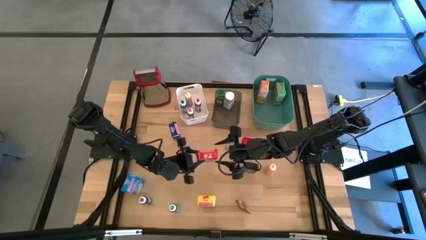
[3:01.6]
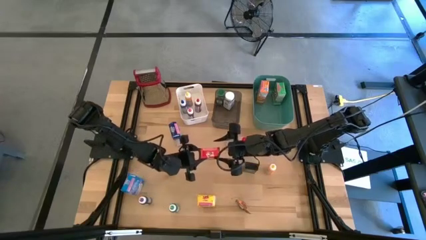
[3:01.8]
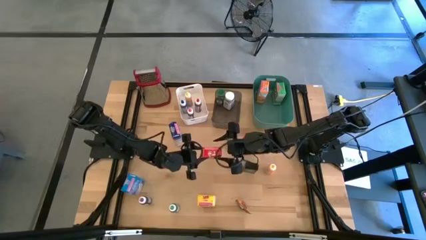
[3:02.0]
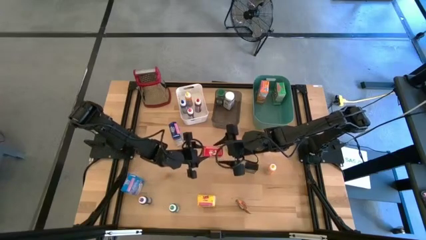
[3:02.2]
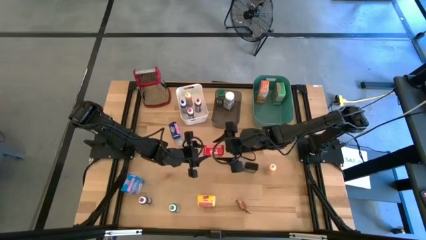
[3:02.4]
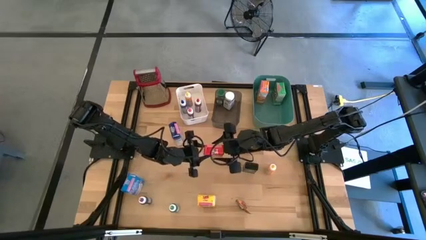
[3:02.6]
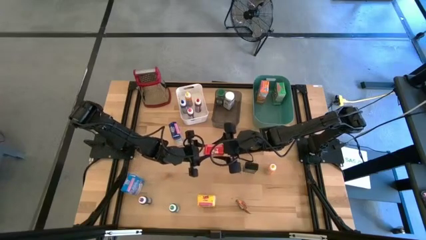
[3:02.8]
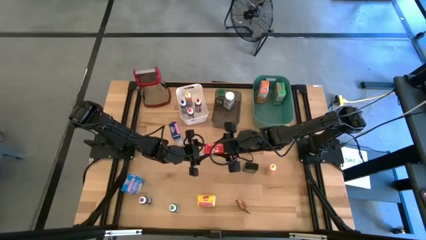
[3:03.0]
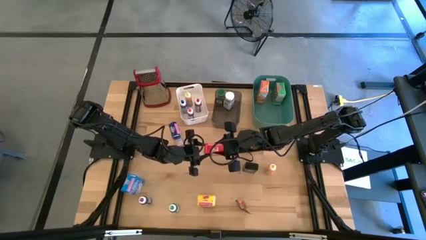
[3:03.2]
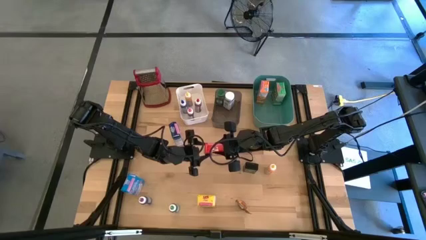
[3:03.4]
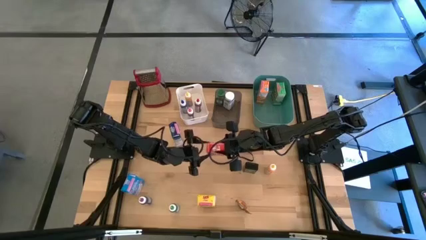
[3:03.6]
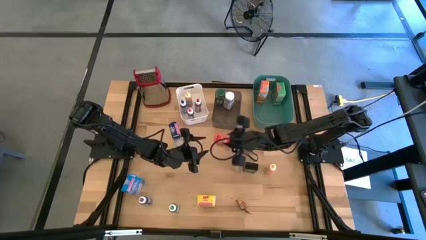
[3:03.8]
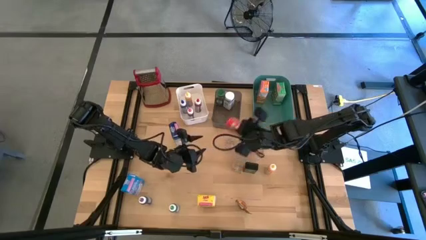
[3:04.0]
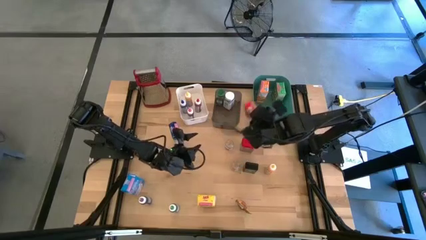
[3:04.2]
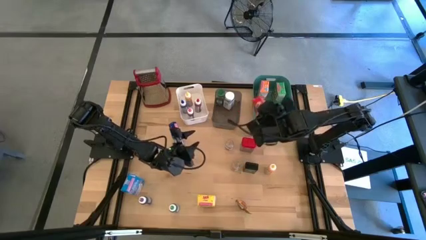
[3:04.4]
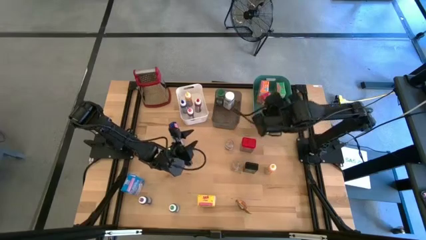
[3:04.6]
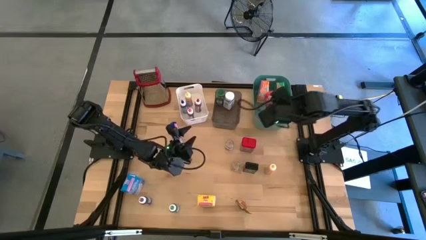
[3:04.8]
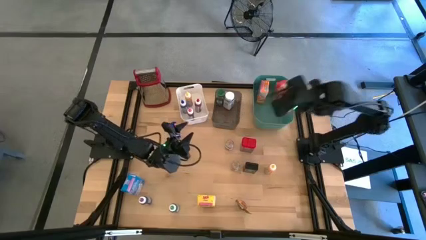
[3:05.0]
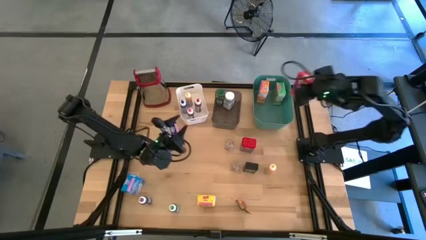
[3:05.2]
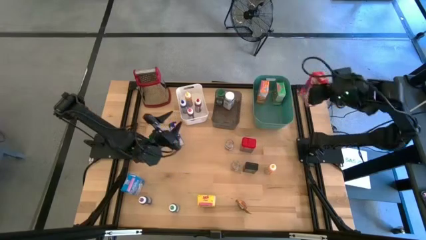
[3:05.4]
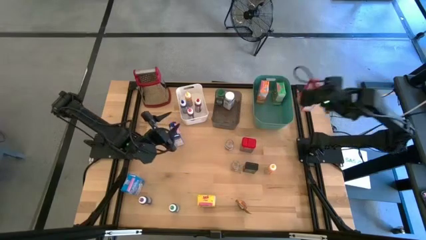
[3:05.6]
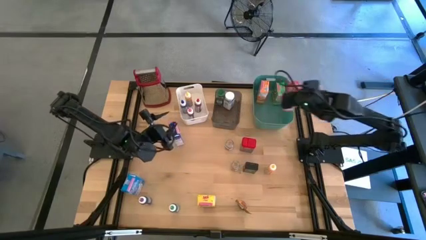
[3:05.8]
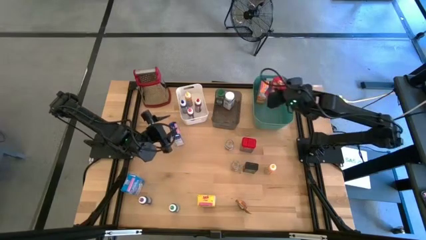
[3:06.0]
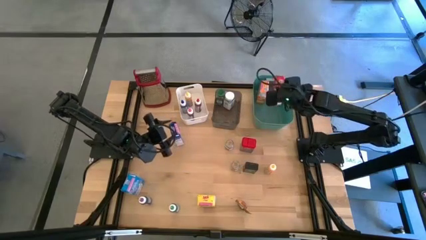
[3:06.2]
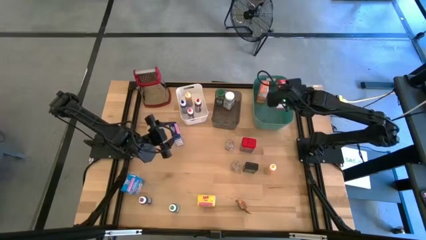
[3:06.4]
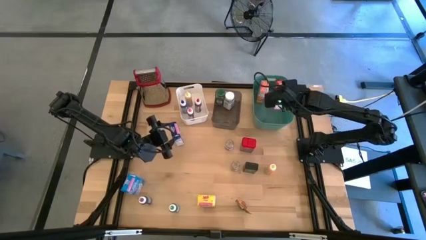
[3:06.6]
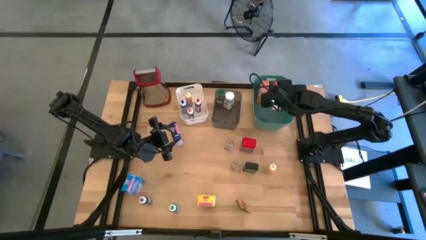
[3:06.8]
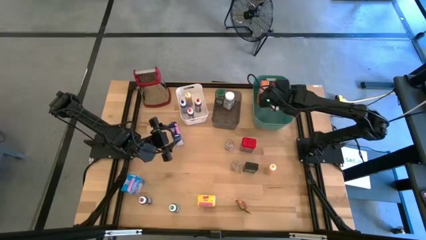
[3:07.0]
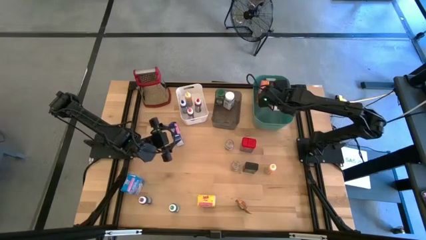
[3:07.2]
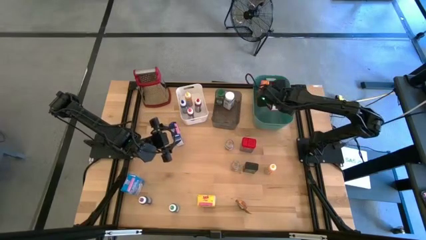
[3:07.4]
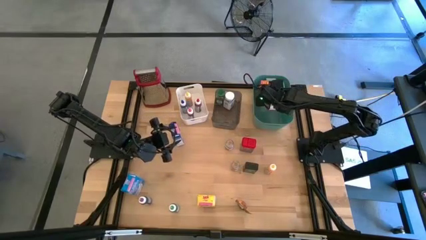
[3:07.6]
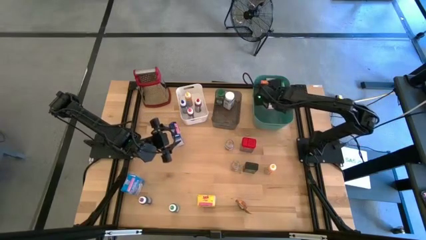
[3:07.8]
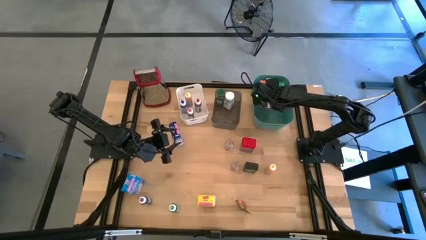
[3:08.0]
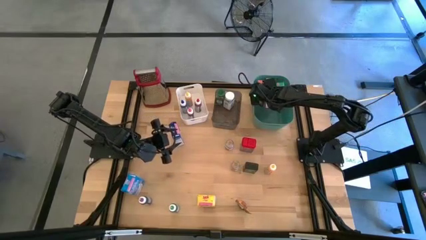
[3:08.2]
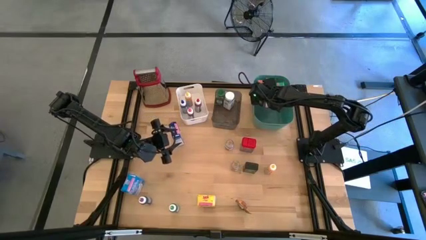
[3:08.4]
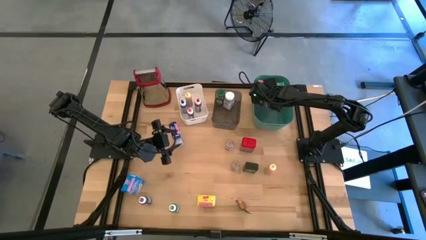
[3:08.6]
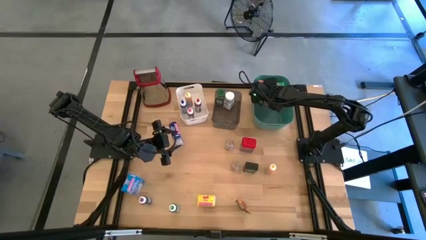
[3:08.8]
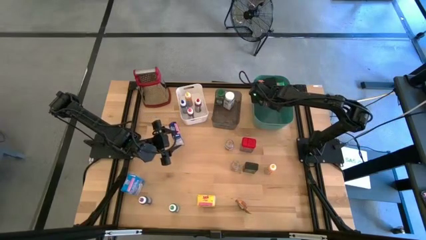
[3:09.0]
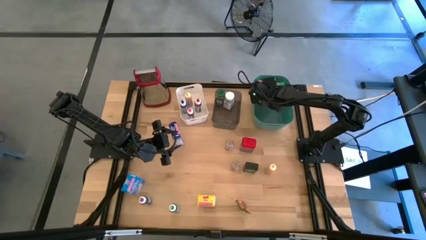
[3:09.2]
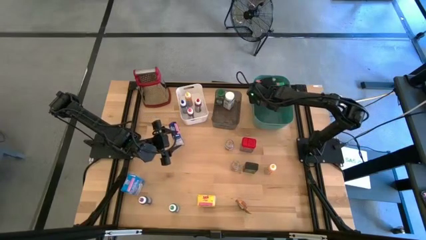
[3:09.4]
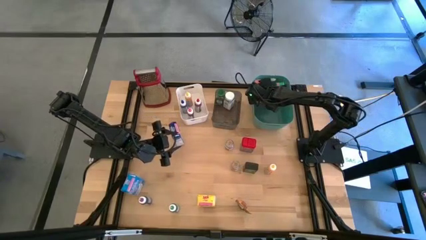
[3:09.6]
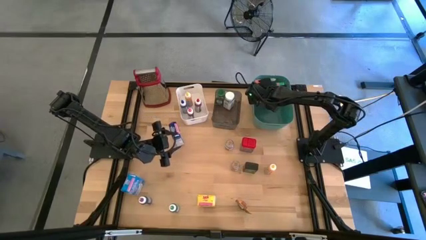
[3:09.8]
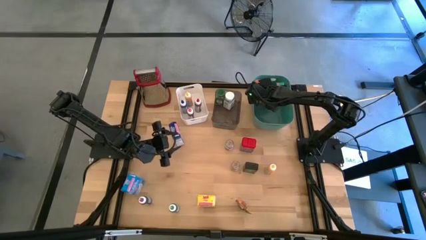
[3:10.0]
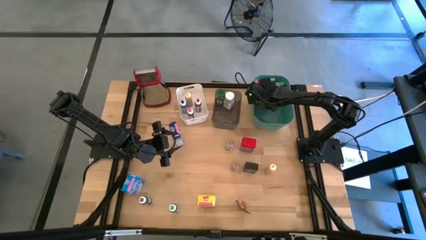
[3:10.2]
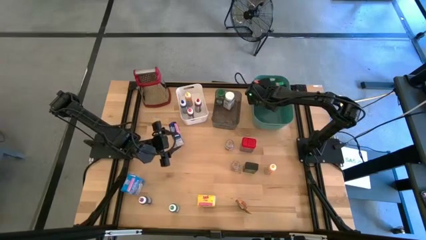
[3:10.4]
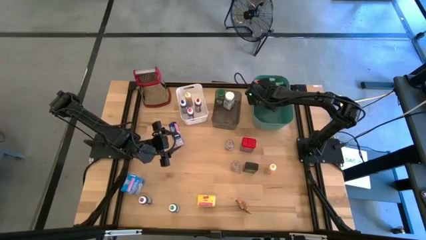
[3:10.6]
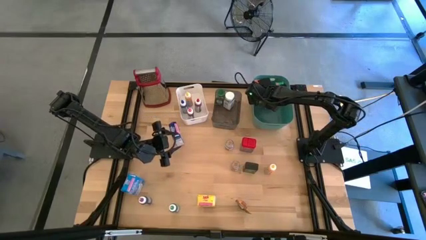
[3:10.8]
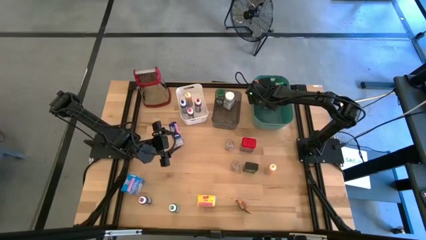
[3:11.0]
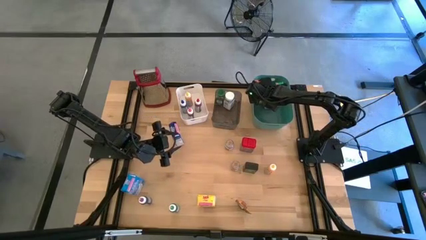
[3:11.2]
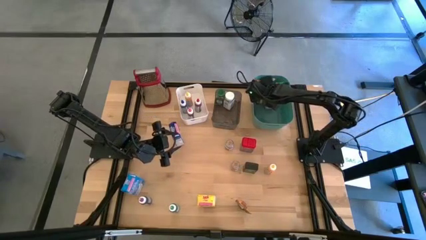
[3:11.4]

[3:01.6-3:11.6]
Task: Pick & Place Kitchen Items
Put the red cereal box into the green bin

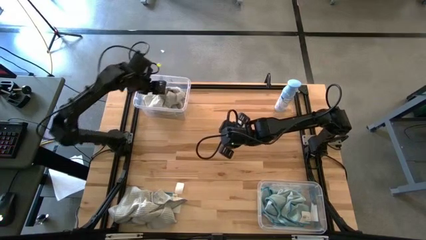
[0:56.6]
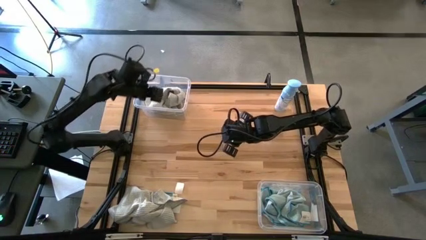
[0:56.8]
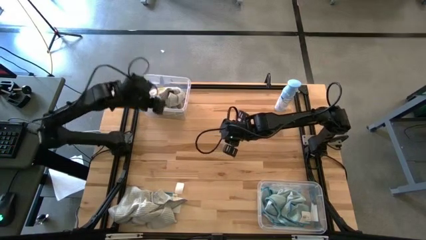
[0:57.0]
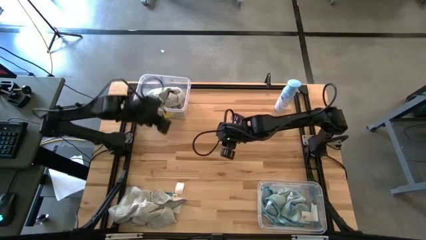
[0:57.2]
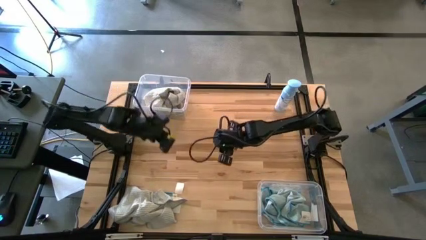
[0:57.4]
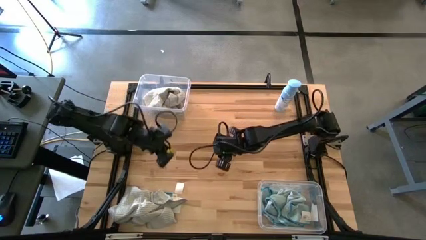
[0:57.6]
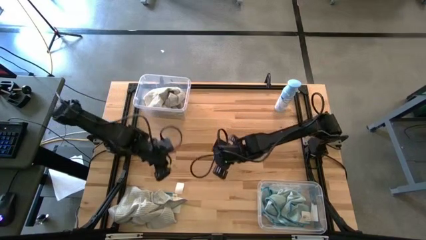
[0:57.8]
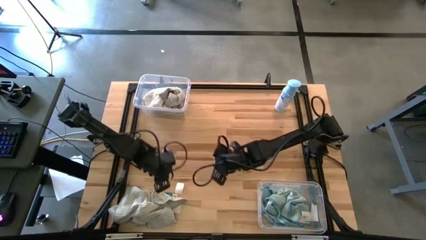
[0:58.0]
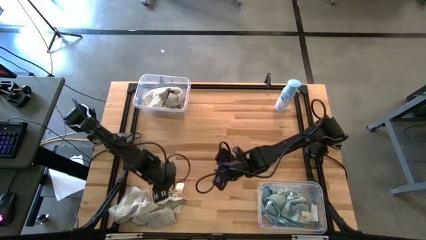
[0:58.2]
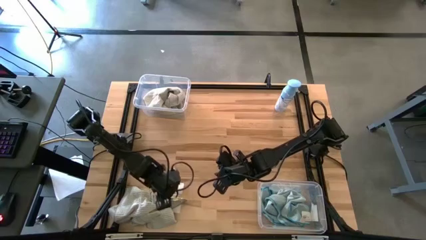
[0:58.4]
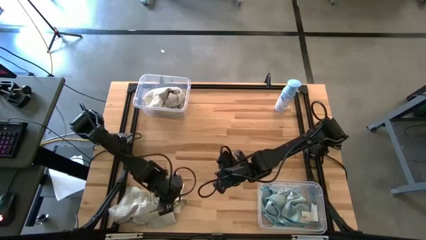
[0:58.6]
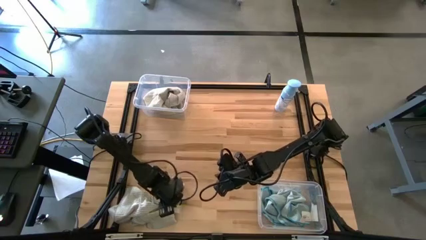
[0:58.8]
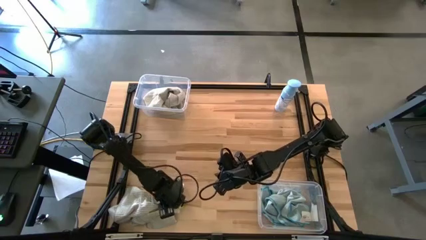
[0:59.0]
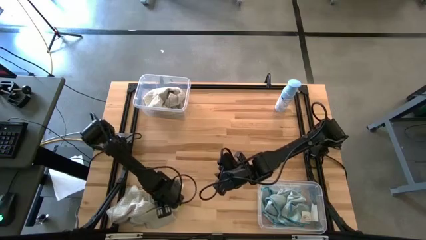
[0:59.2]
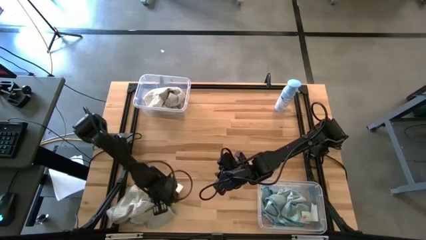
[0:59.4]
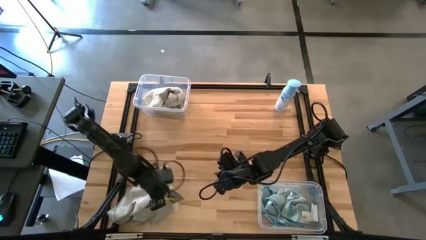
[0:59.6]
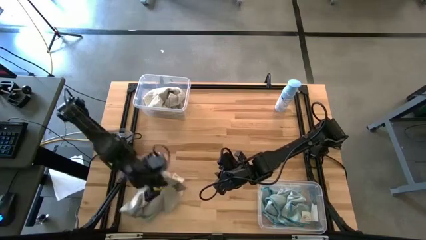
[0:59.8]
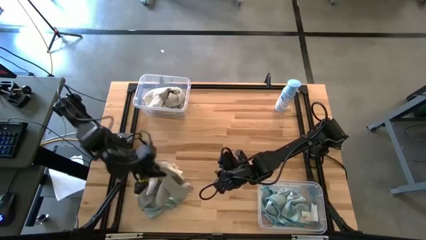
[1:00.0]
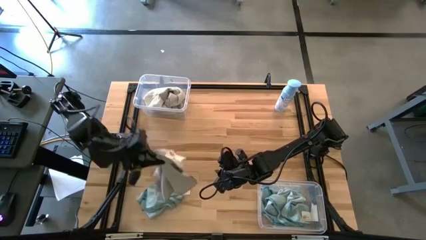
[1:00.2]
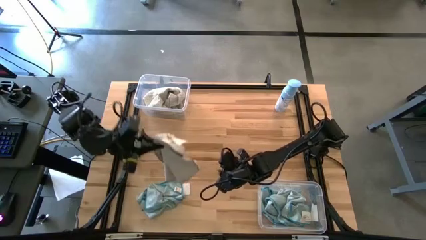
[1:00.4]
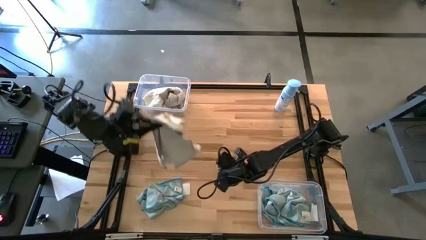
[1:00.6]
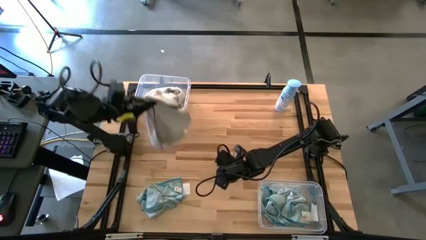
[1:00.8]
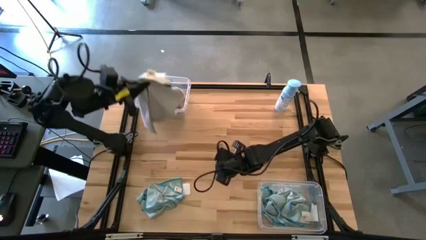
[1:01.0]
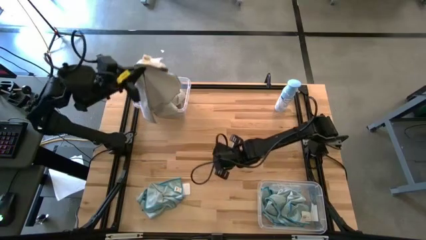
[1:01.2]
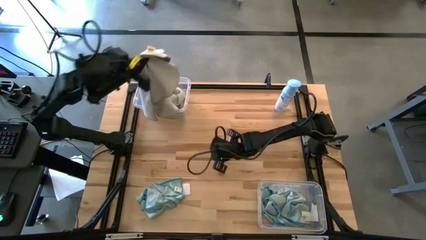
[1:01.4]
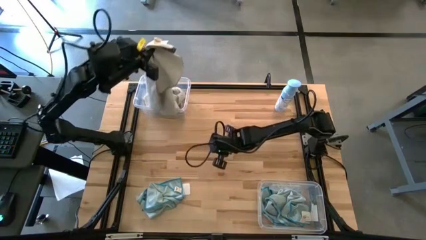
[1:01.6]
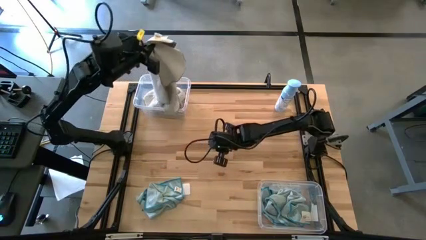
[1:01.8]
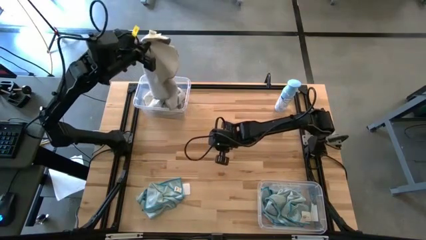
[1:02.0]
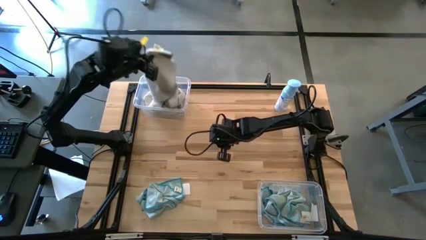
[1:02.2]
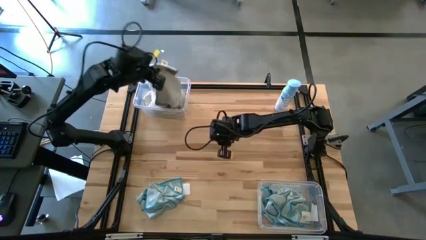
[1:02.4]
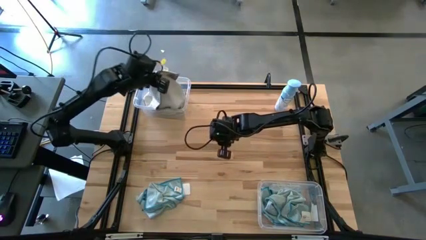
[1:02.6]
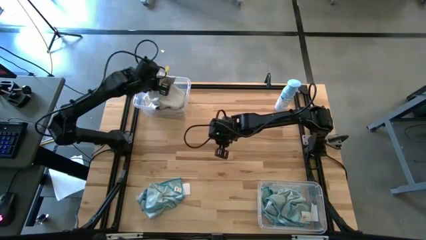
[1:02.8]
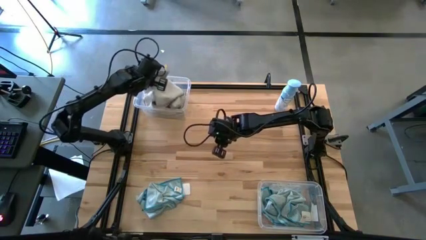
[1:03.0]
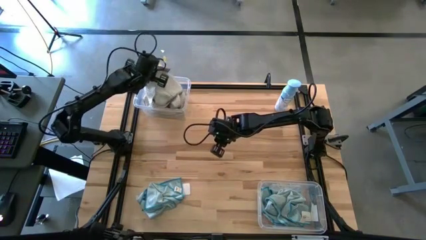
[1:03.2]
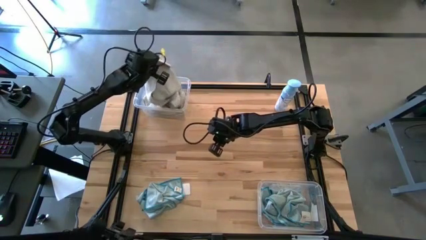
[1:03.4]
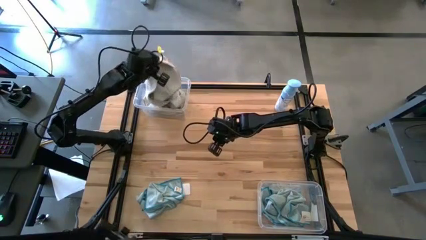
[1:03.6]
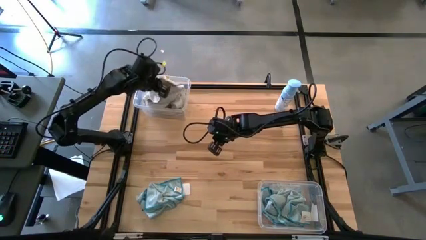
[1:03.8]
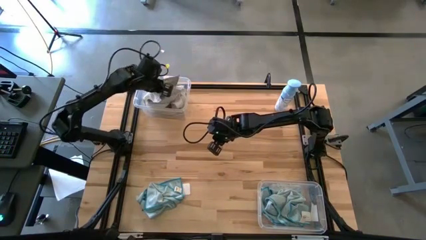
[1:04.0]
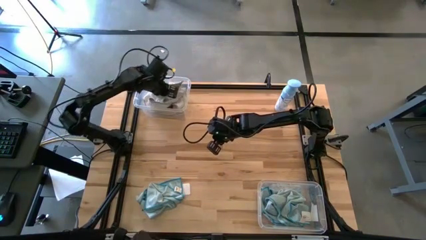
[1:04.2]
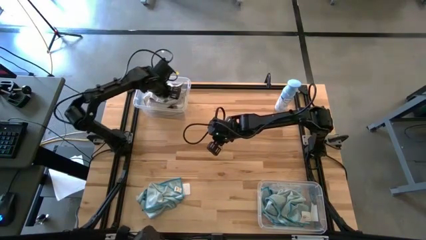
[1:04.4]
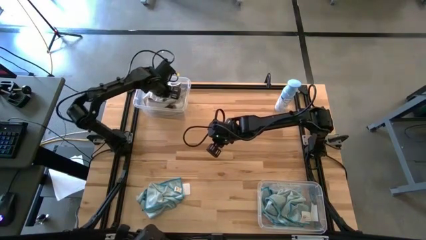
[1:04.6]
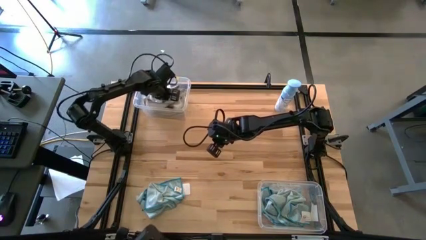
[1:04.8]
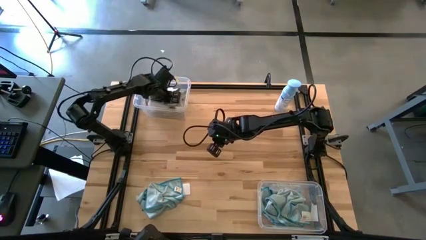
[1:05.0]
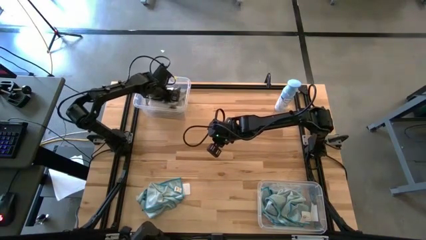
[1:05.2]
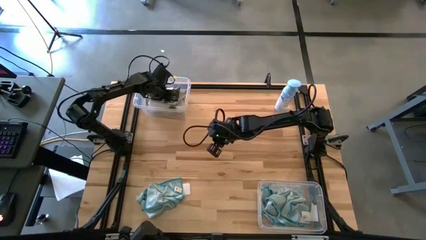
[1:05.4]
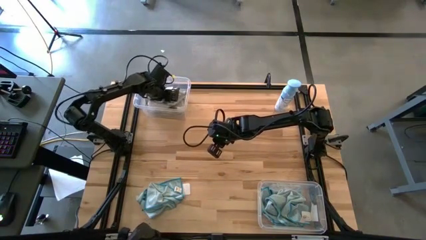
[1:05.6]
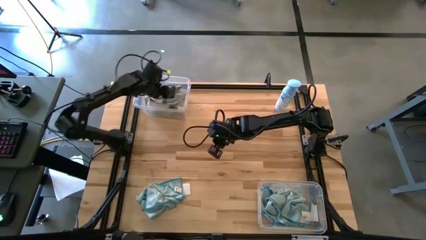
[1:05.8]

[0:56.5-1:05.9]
Task: Sort microfiber towel by color & place in baskets
Put the white microfiber towel into the top transparent bin
